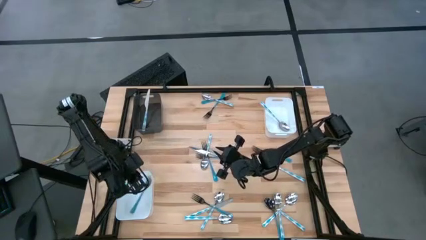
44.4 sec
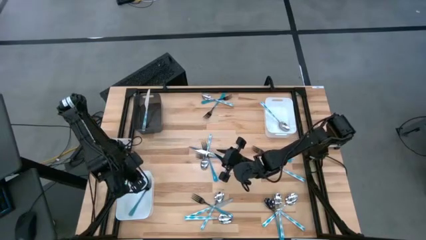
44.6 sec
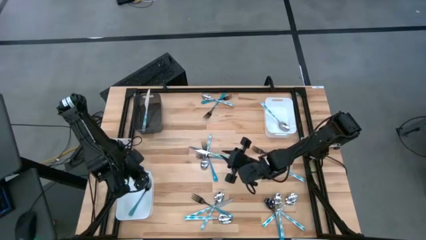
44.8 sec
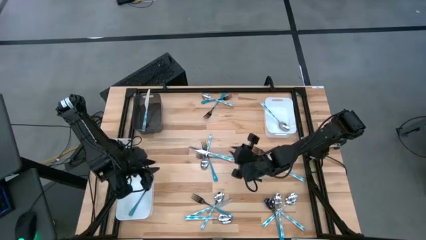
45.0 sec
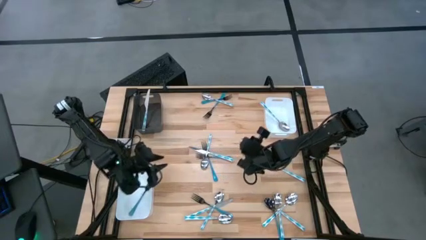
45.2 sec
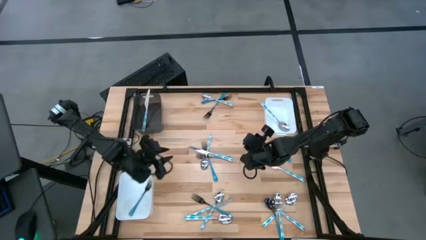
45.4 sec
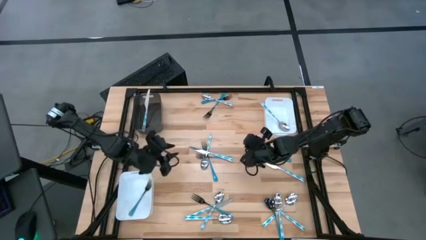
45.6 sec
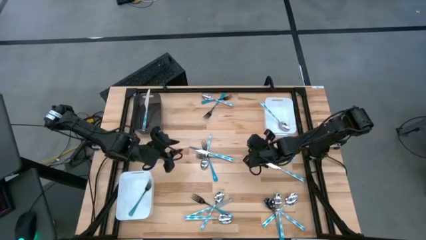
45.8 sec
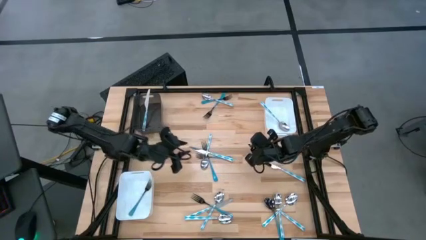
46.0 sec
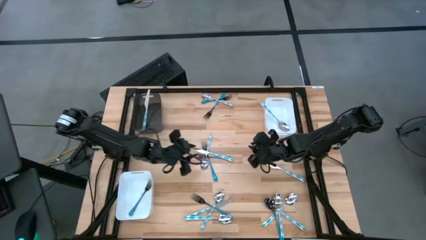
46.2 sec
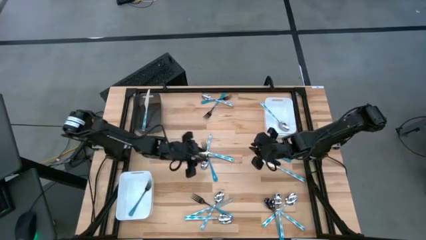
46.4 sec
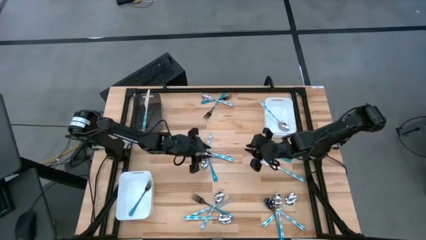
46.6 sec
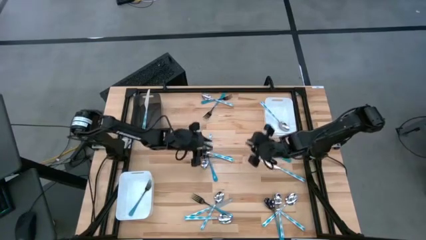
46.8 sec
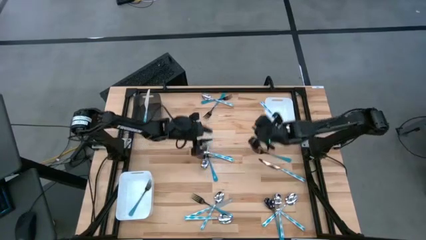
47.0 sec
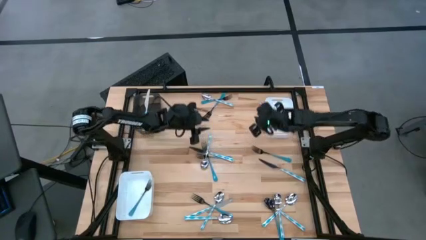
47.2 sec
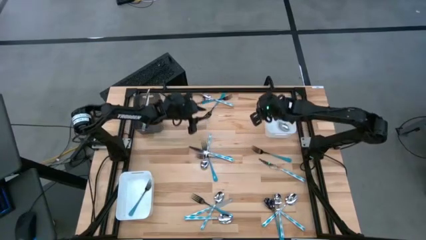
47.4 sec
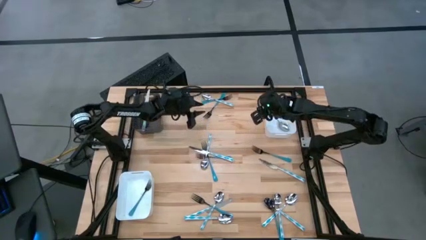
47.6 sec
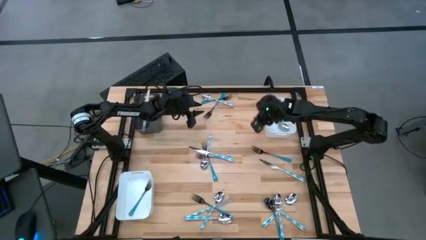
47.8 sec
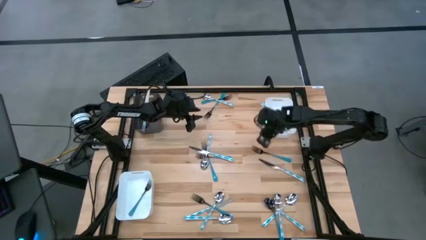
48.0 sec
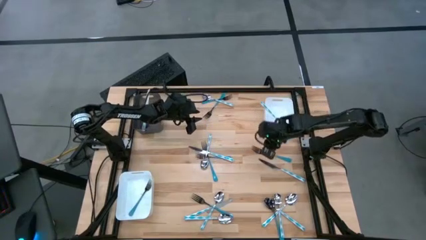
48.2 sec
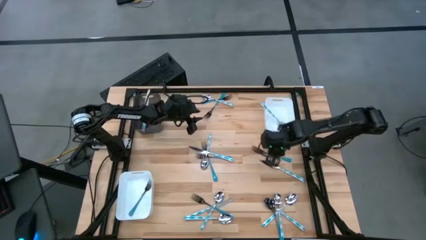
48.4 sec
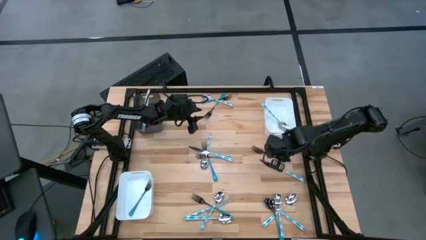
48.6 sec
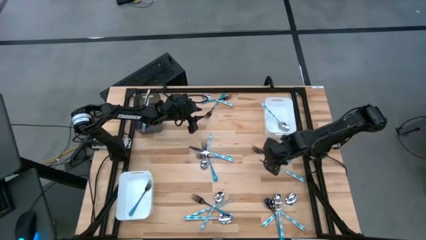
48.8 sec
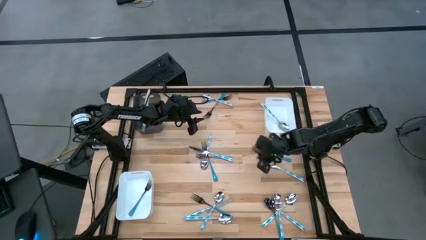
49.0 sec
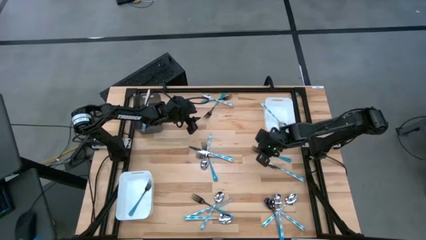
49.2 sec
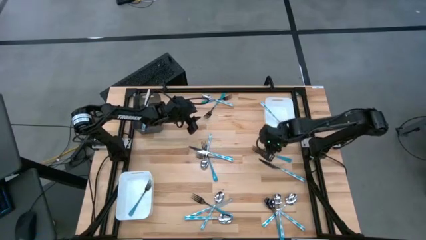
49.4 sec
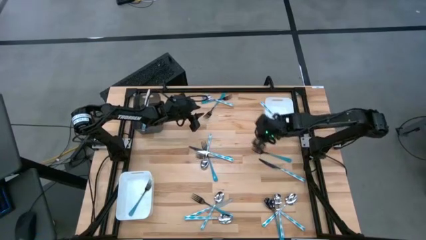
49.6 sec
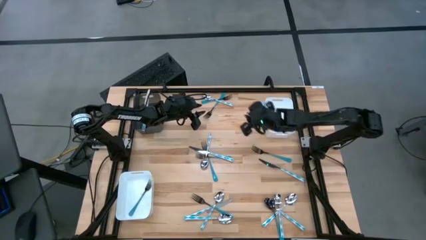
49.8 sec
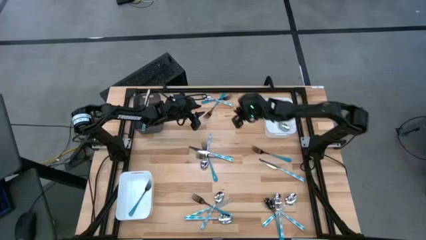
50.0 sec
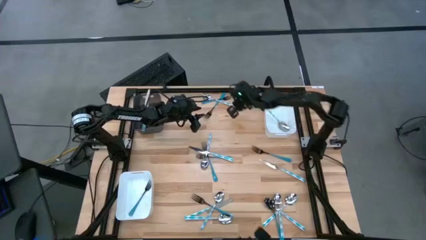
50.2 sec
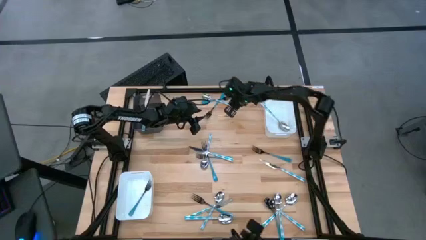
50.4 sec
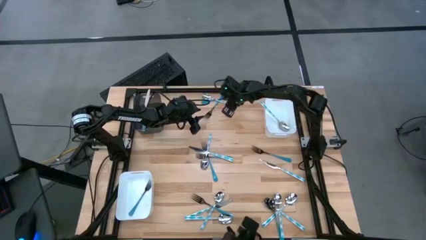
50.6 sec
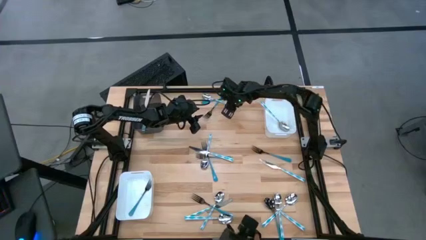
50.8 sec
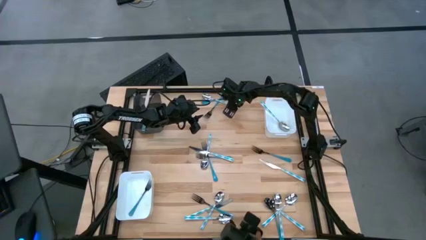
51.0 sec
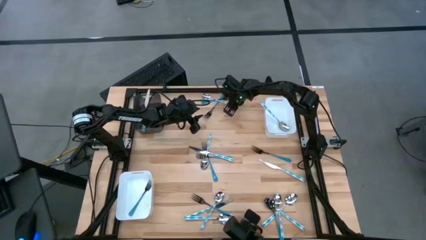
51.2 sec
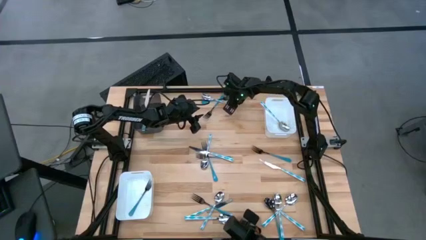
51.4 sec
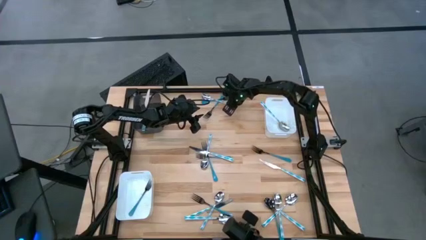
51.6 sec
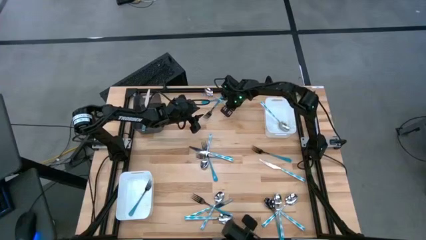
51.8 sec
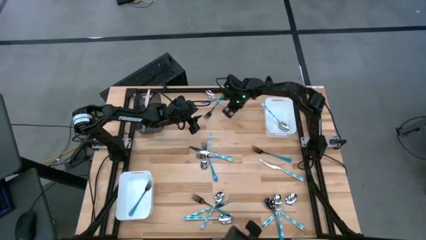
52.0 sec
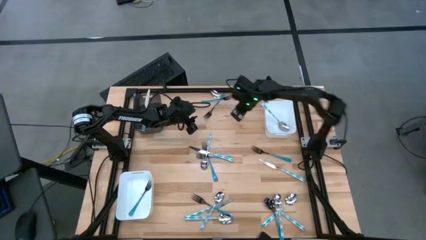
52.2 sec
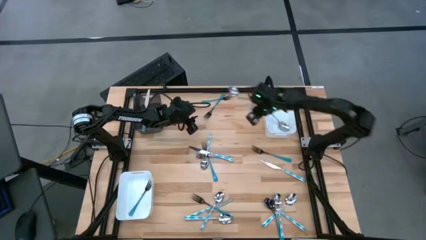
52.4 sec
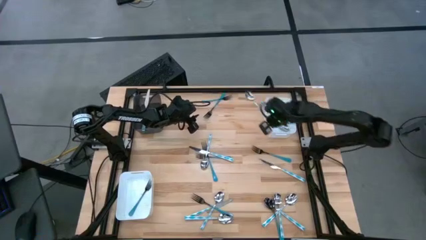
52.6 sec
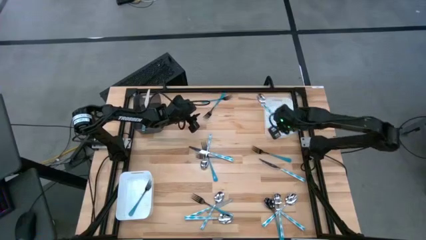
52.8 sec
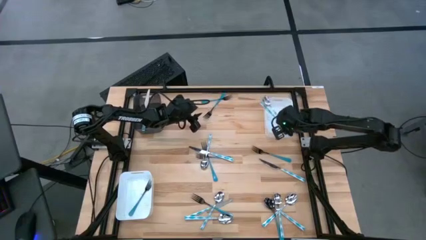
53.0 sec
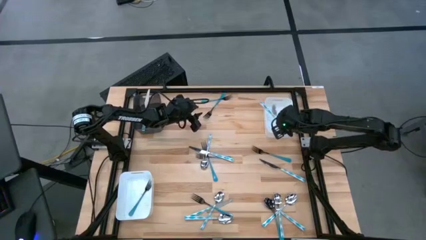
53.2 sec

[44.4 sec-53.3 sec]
Task: Sort silverware by color (type)
Put the blue white spoon into the right white bin

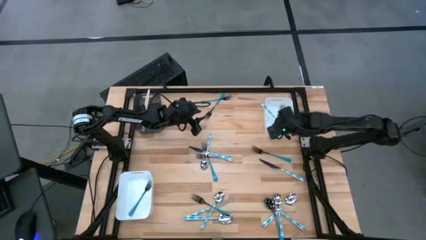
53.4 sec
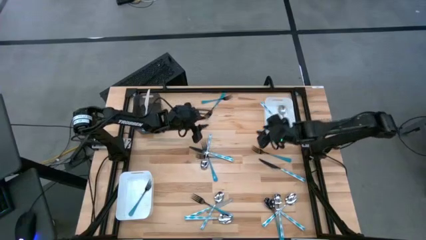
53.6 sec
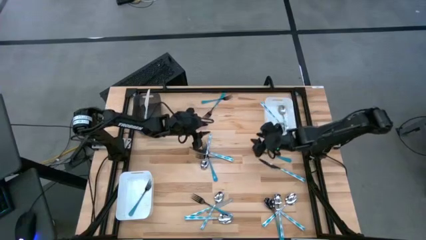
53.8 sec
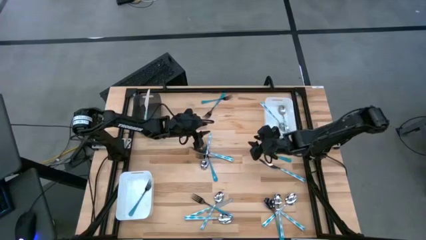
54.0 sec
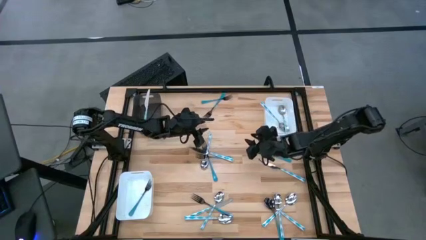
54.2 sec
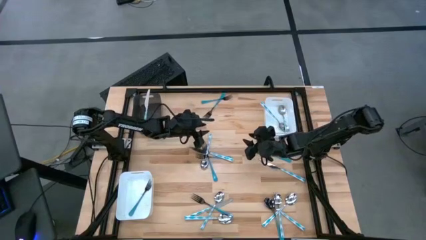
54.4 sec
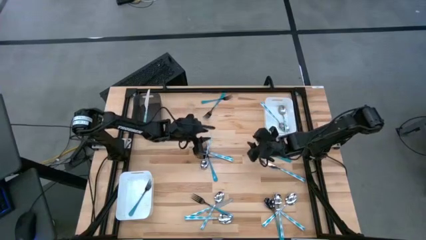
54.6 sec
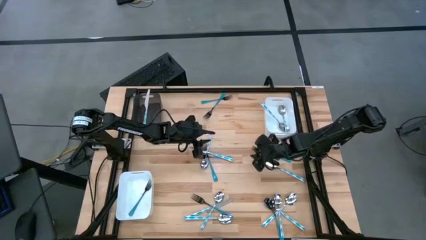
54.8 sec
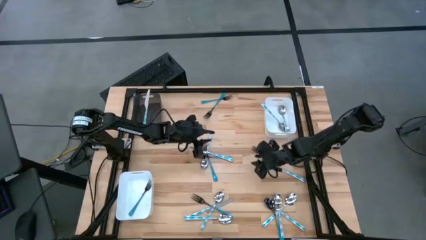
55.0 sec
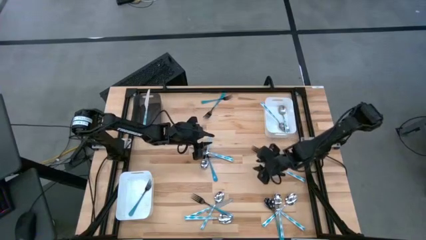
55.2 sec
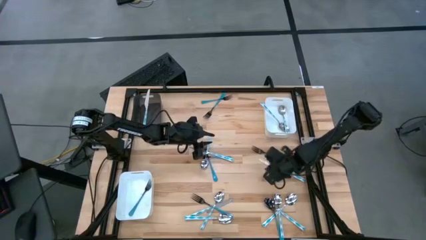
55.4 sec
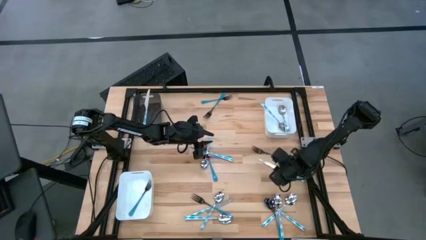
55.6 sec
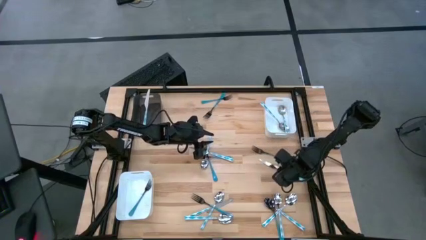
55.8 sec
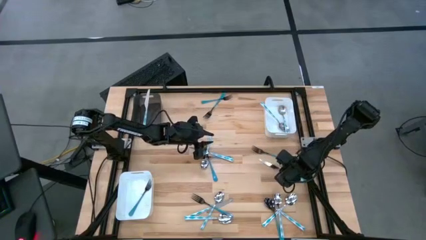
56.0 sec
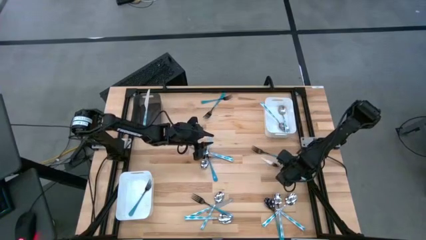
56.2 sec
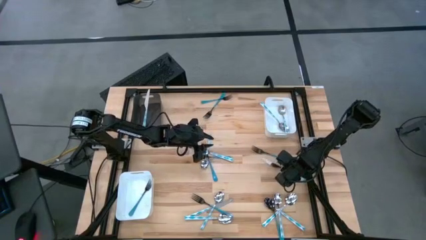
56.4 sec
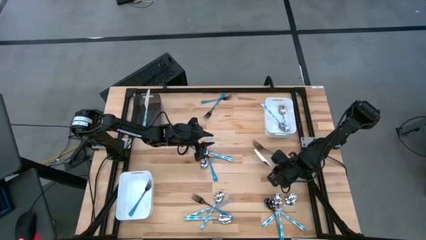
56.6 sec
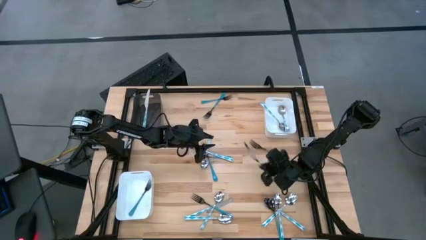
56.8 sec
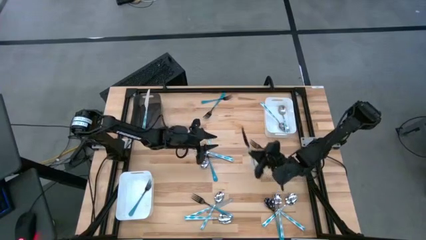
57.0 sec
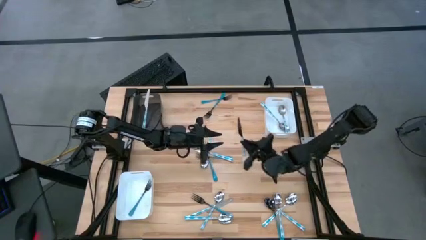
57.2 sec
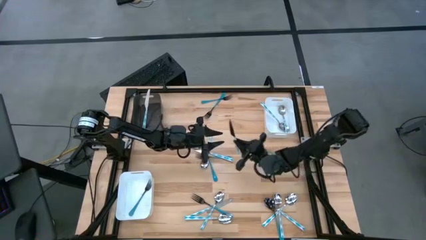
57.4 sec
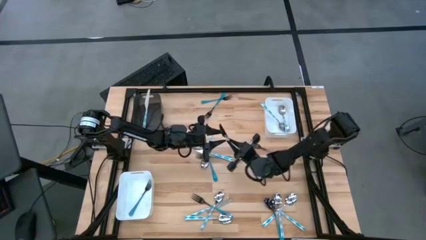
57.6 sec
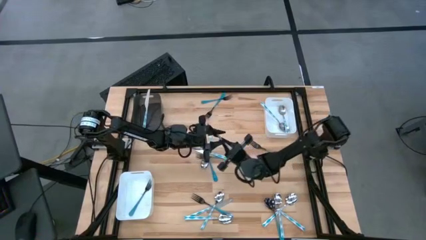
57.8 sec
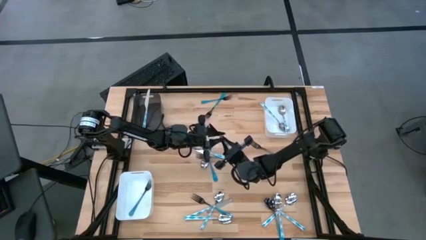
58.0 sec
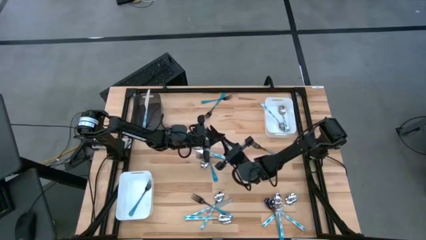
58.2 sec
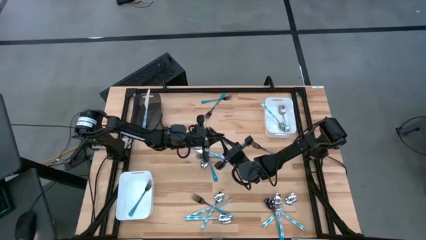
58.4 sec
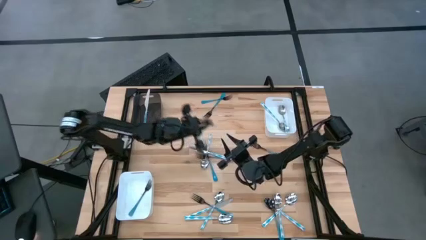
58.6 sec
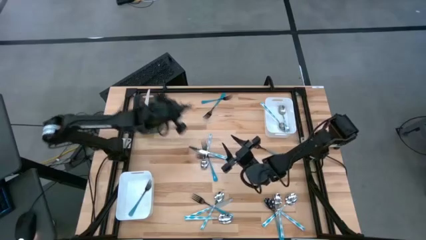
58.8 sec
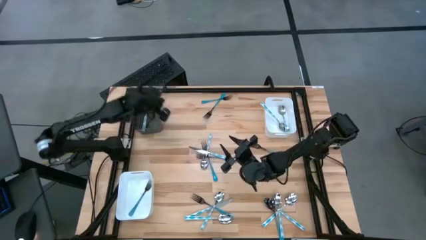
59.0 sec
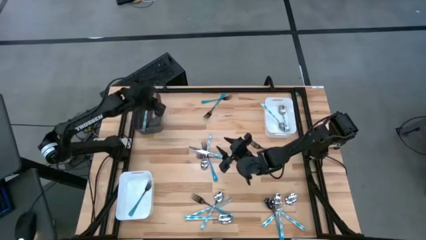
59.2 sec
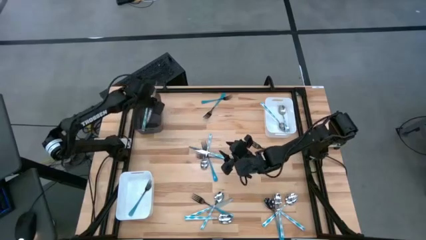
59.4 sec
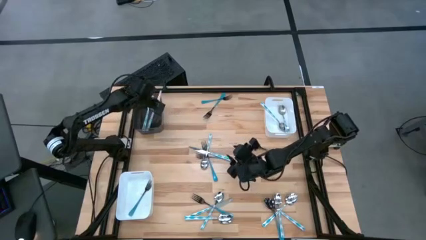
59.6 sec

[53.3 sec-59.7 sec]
Put the blue white knife into the black bin

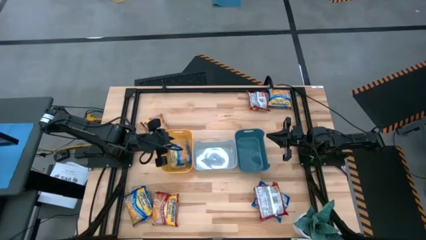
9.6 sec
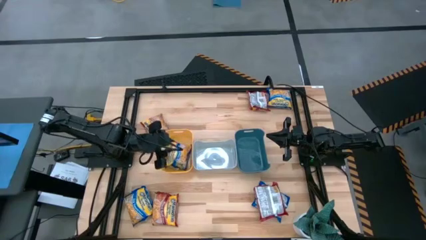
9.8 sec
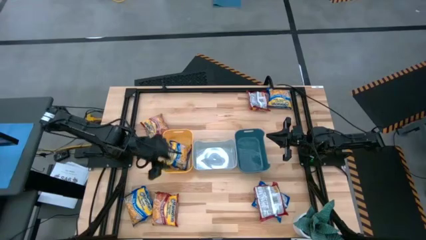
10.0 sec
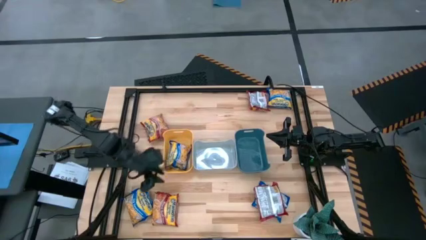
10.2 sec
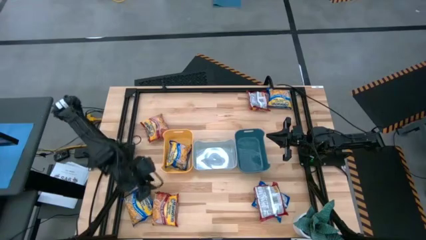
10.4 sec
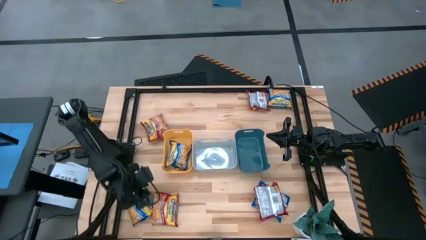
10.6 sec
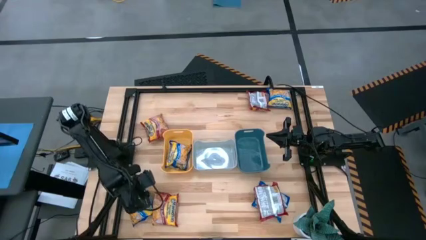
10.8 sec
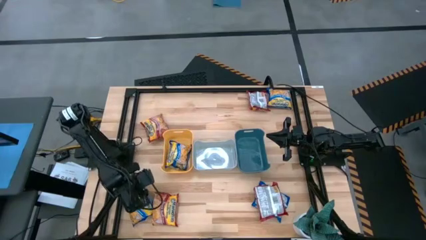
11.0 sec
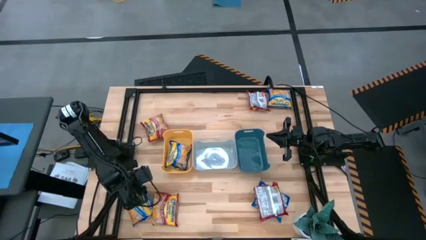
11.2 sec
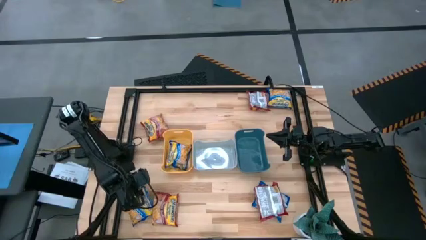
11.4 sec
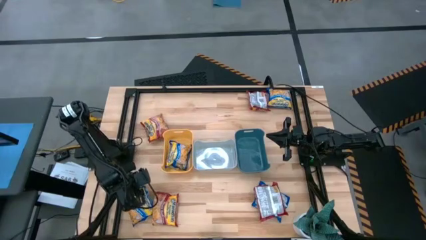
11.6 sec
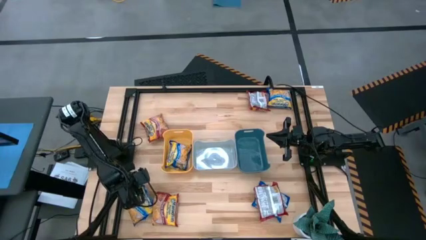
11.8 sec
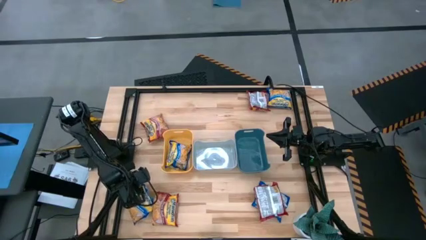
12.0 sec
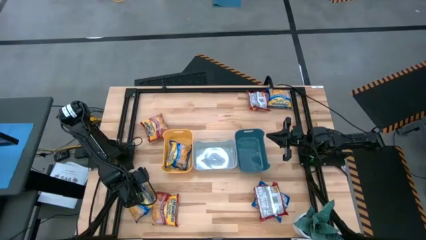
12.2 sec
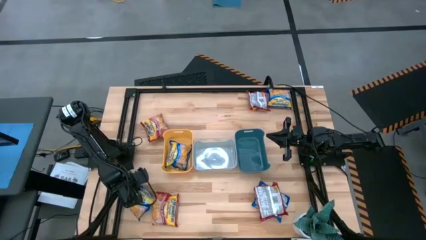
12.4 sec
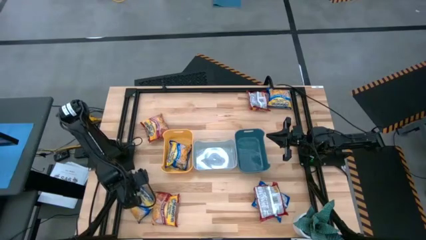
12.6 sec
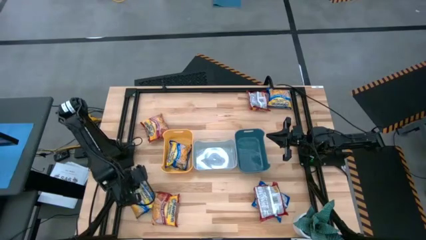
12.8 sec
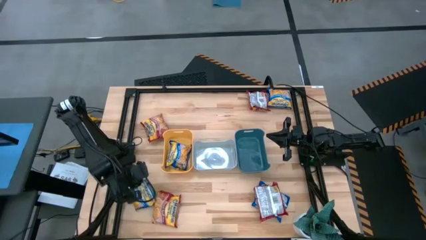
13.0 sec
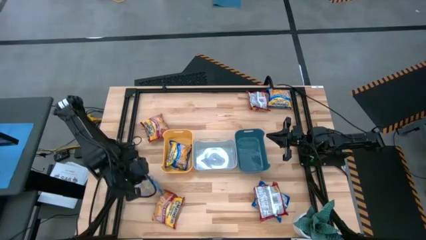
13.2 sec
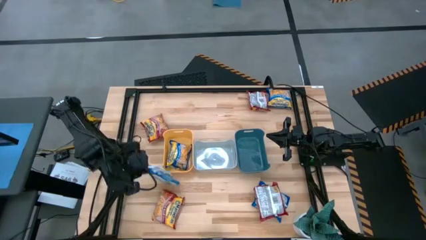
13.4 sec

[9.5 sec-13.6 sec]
Task: Sort Maruchan noodles
Put the bottom left blue noodle pack into the yellow bin
